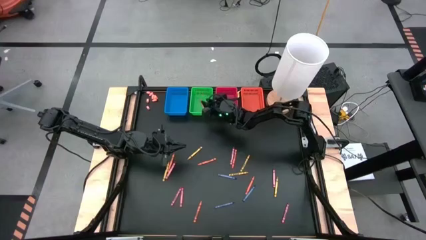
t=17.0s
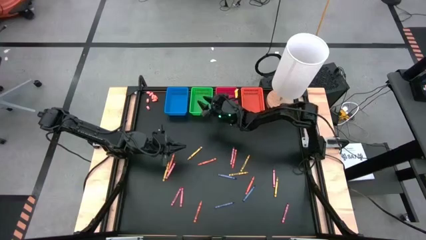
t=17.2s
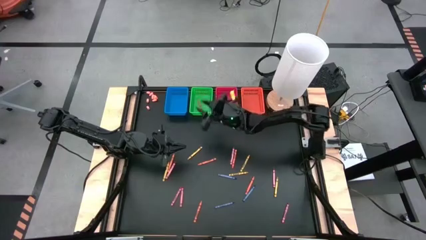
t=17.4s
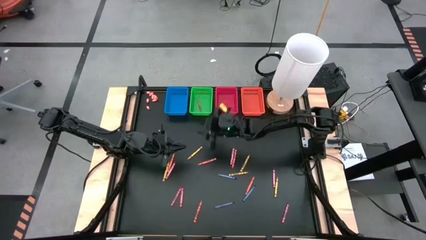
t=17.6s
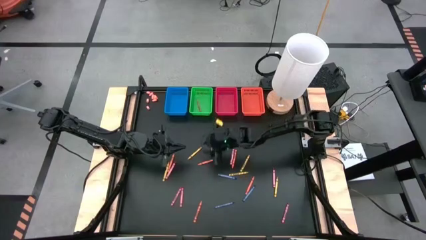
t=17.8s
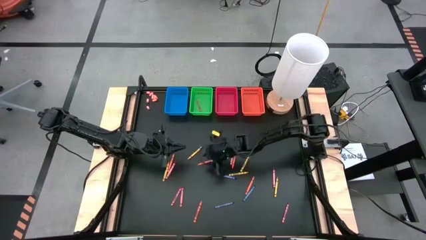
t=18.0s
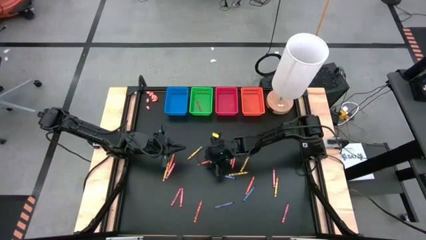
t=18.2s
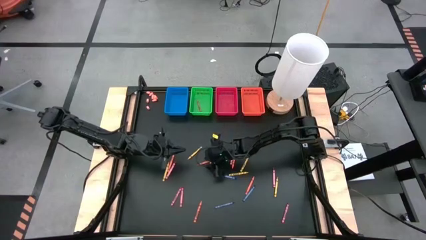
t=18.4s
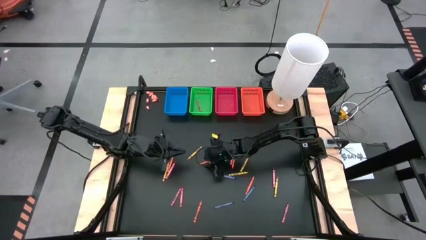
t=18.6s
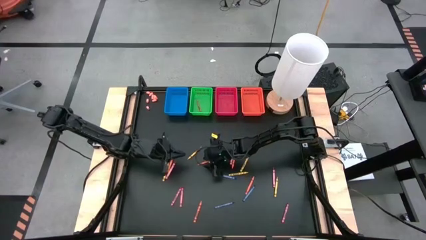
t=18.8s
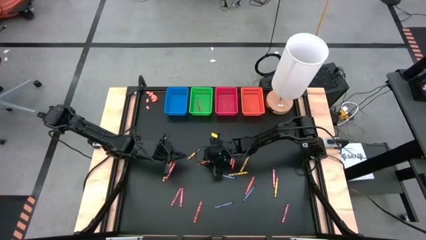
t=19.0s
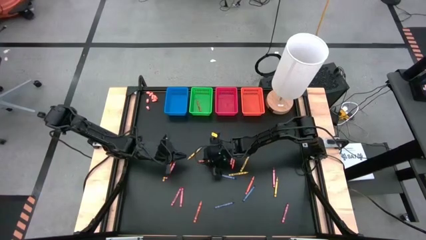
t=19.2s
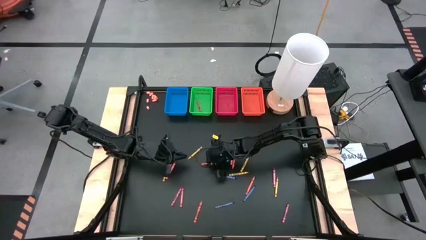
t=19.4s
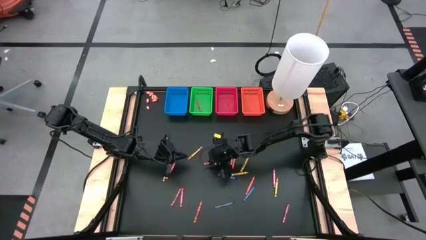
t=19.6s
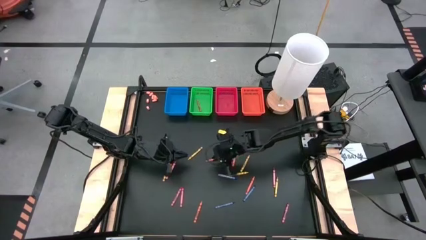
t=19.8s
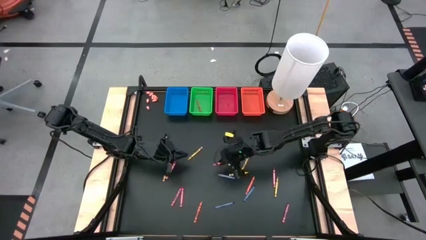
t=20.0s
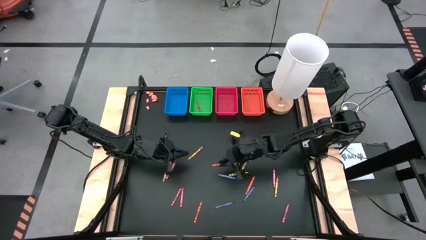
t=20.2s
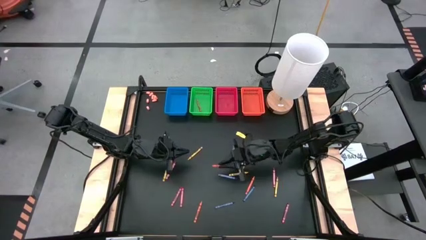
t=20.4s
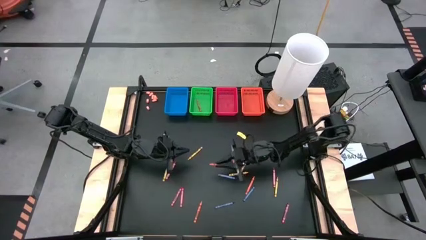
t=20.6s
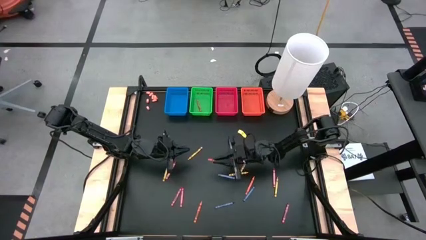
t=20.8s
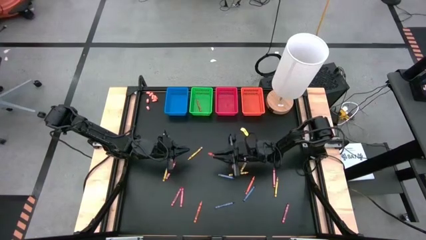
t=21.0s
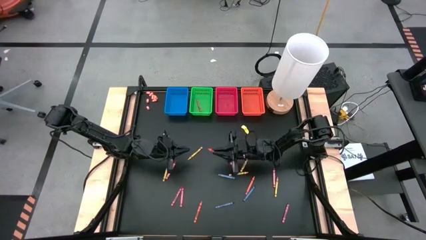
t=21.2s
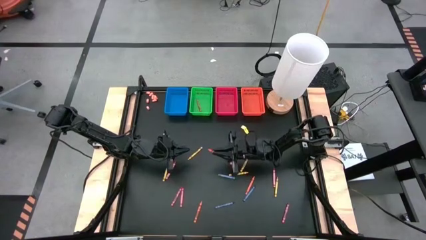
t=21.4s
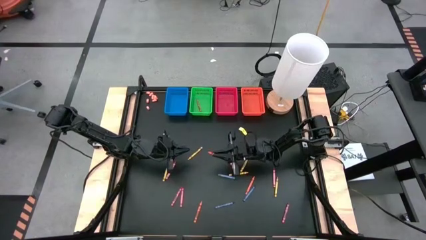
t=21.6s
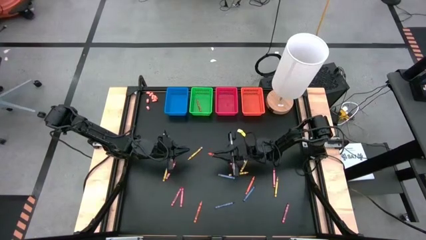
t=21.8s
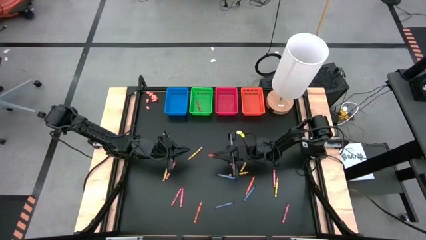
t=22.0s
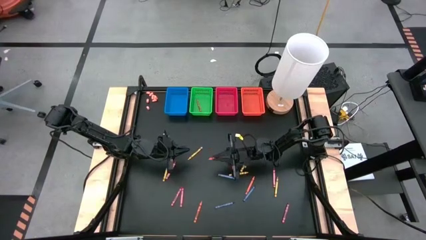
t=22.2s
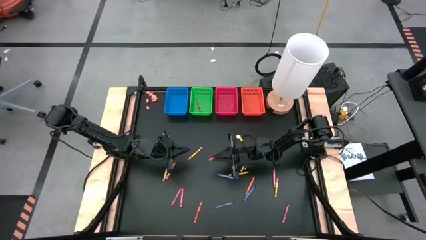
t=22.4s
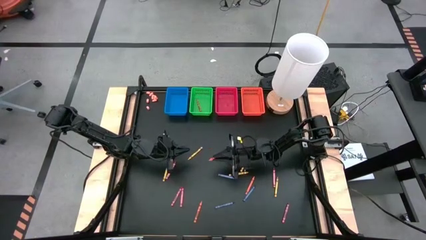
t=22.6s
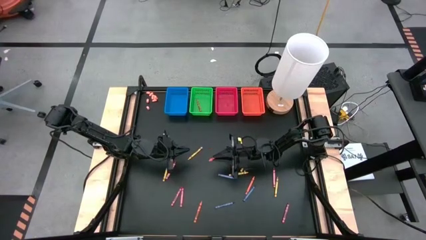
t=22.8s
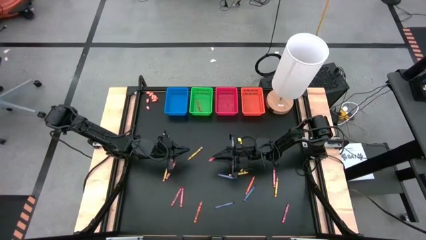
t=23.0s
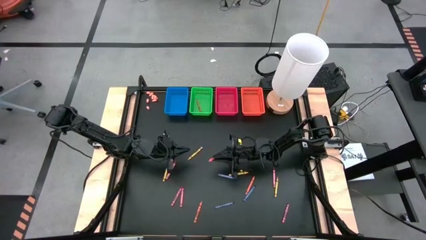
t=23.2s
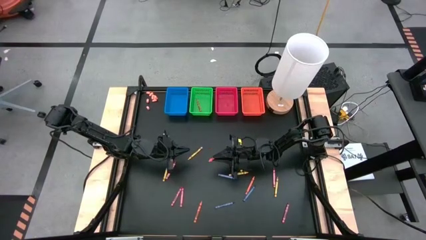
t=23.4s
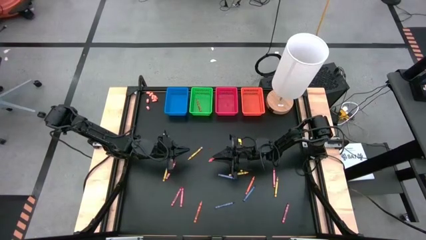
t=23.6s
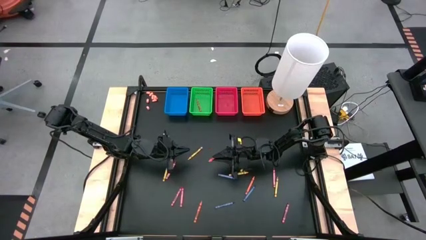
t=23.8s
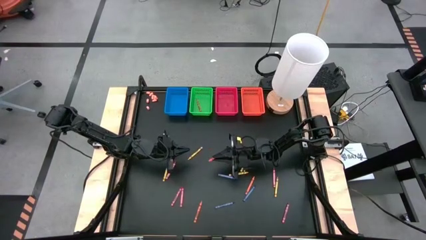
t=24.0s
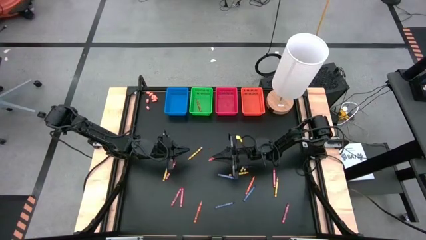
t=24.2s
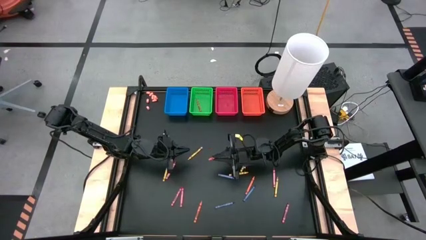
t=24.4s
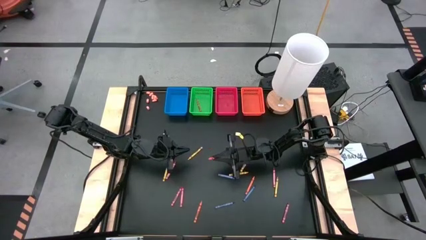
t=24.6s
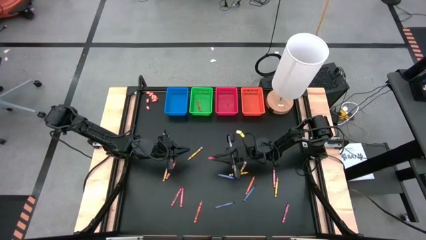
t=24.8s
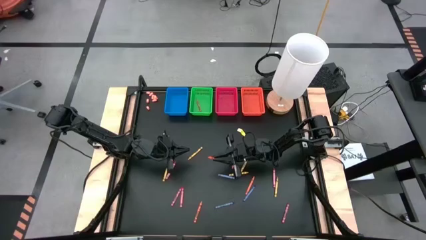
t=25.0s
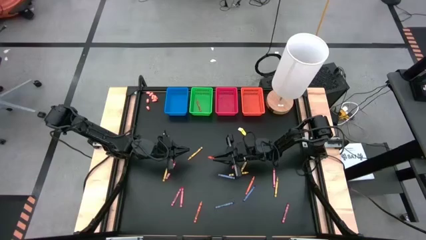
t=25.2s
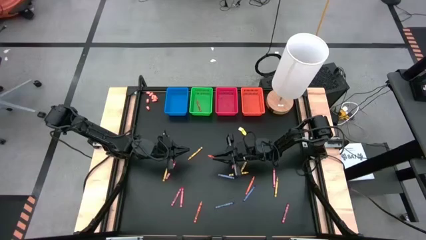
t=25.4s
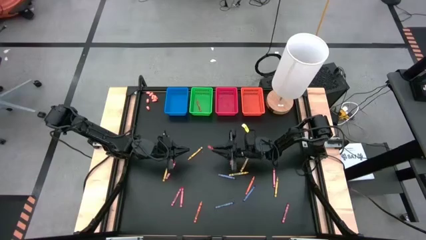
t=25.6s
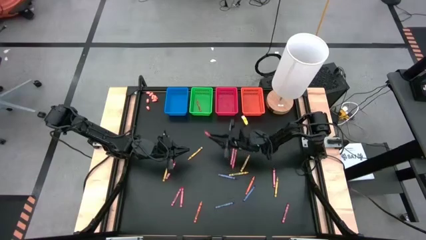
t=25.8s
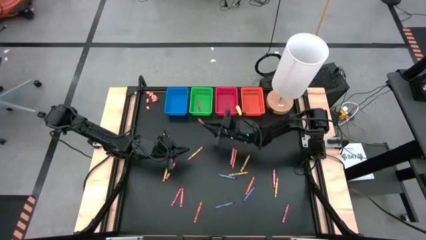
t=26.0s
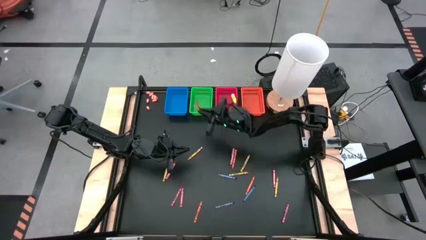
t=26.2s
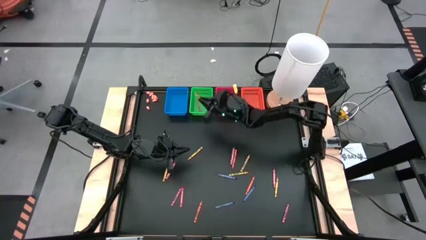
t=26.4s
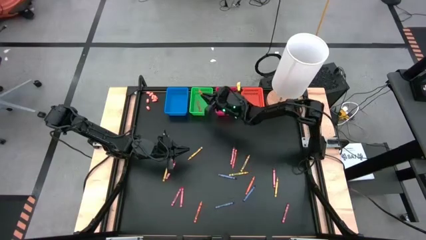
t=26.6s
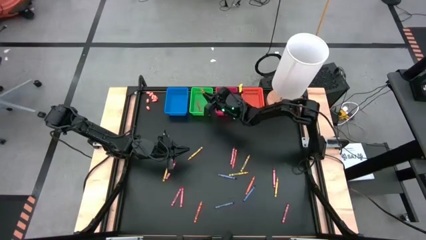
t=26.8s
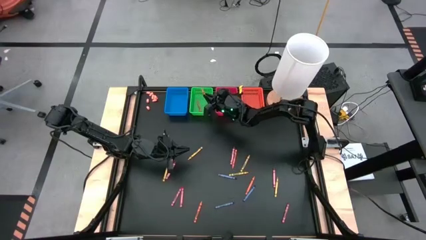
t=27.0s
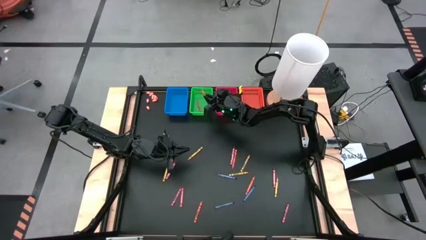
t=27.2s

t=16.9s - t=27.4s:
Task: Sort crayons
Put the orange crayon into the green bin

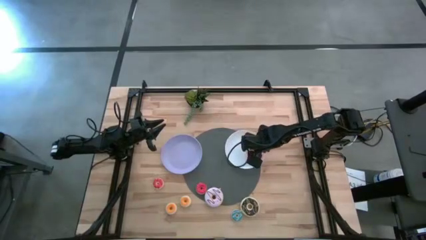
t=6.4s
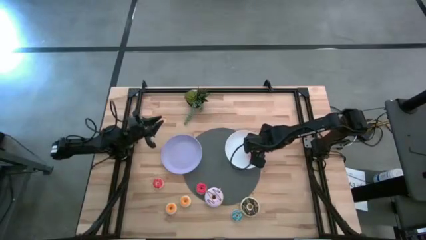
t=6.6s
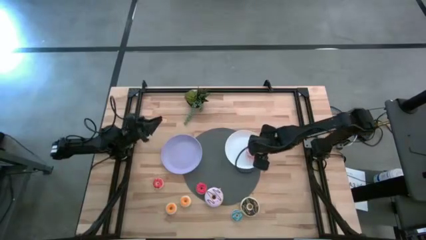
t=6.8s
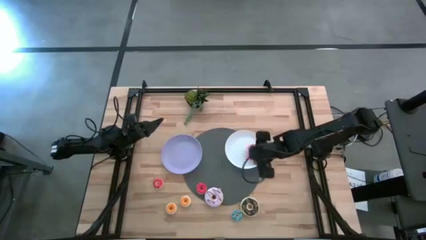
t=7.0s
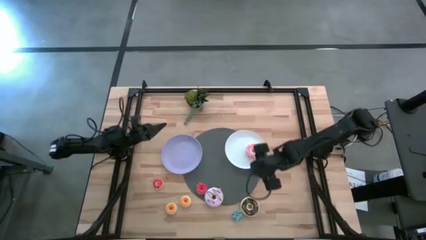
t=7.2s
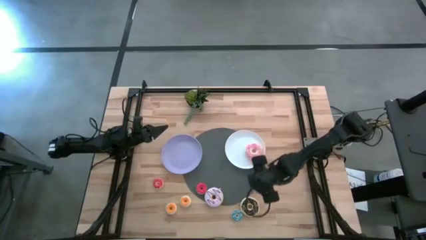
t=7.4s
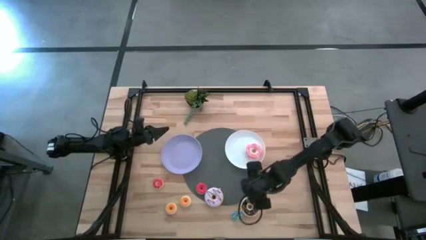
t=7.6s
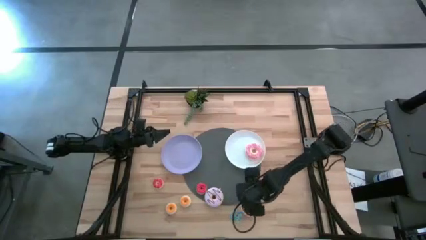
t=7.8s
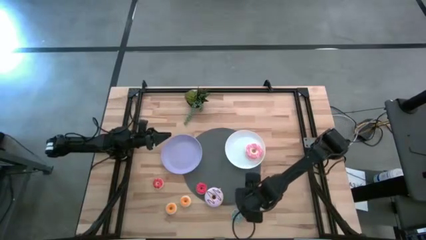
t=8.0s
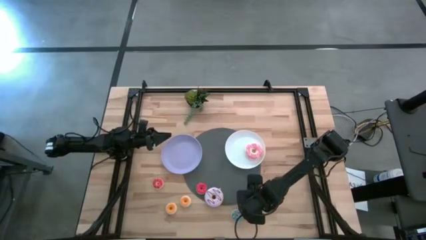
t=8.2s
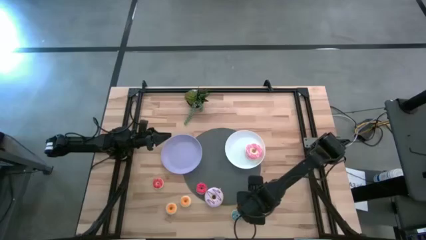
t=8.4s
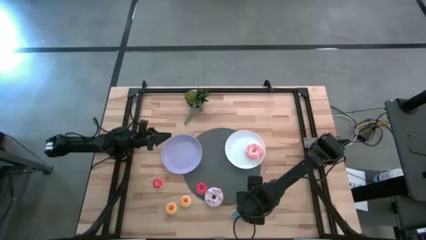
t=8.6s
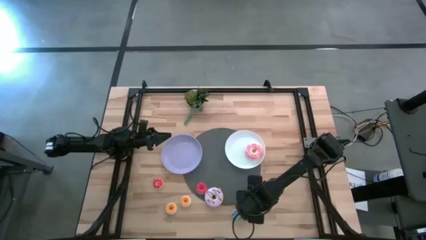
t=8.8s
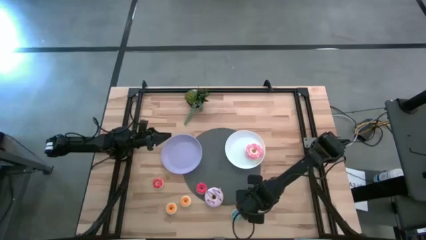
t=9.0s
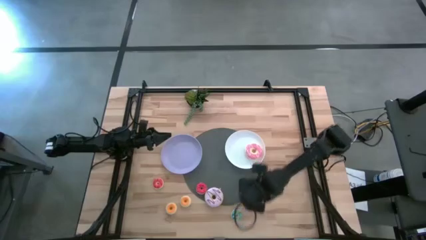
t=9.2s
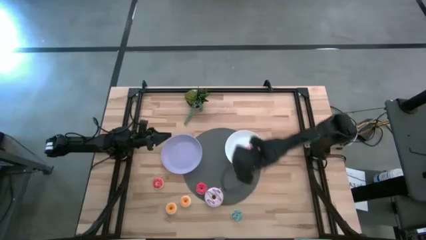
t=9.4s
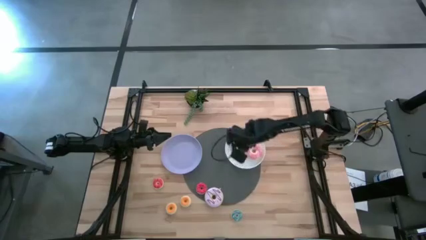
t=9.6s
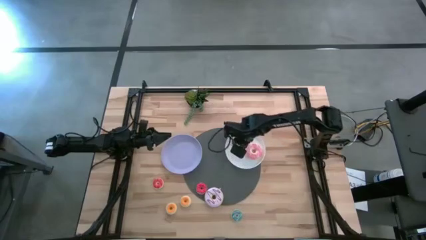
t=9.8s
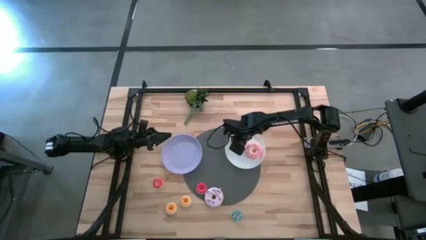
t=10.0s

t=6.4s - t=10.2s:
Task: Pick & Place donuts
Put the large black donut on the white plate

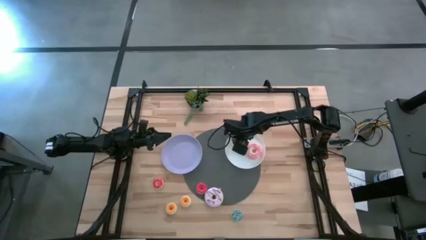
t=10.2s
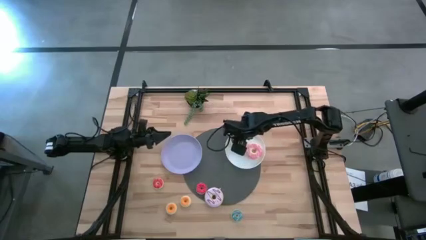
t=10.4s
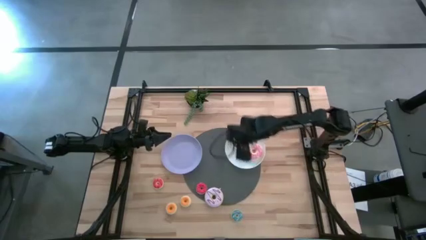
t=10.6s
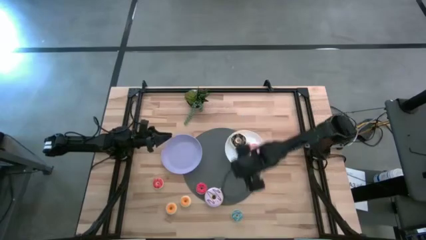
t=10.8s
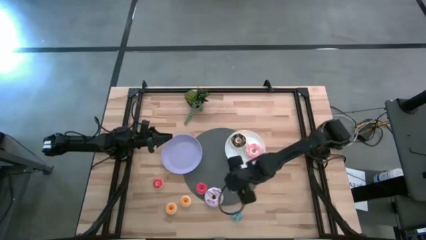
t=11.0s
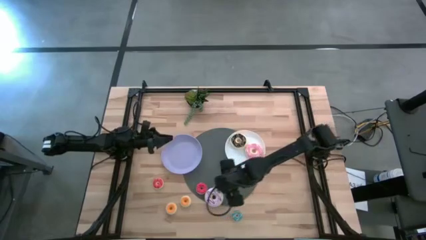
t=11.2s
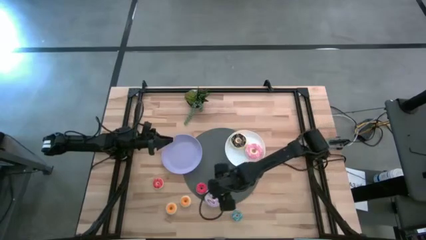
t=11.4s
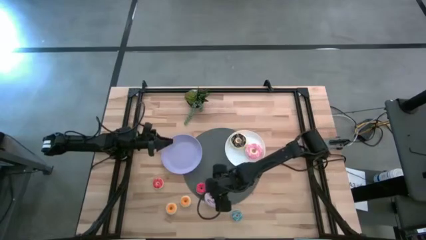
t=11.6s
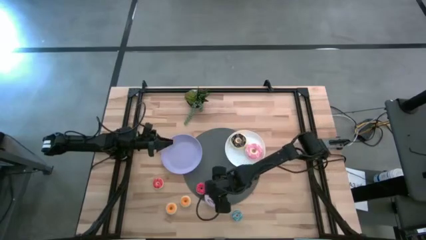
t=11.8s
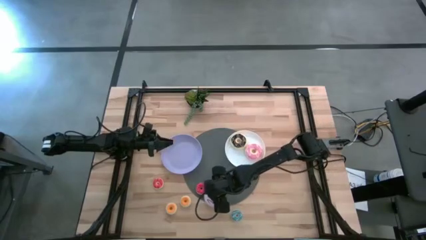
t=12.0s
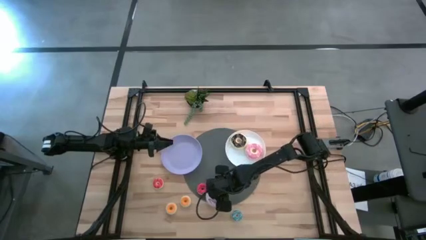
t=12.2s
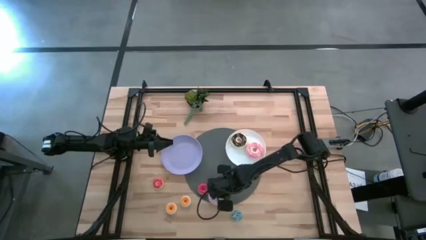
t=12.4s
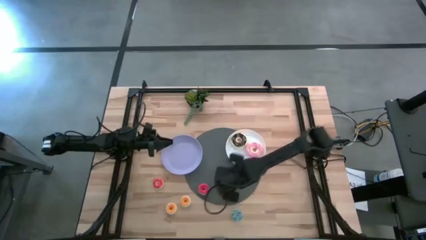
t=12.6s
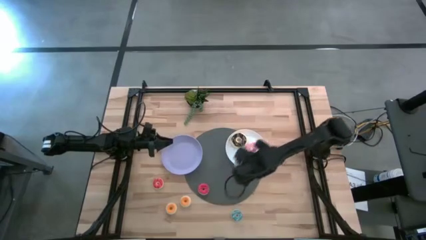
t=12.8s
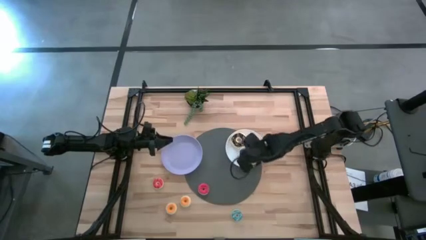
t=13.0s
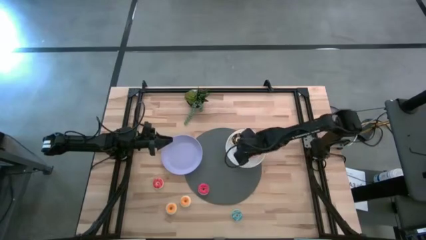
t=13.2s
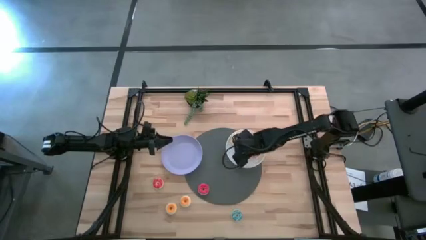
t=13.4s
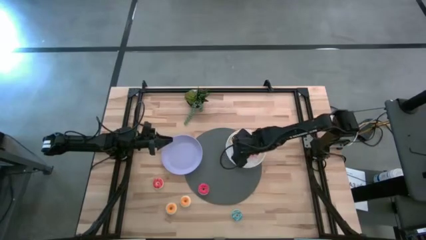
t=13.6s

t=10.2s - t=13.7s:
Put the large purple donut on the white plate
